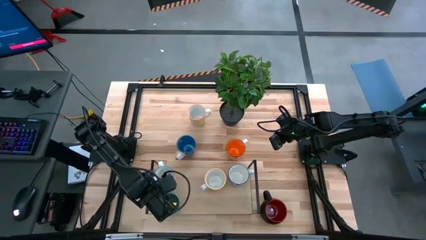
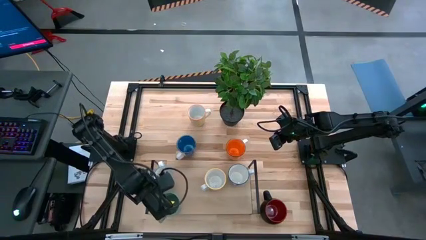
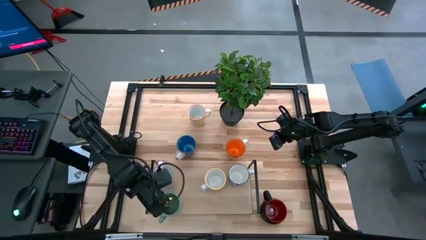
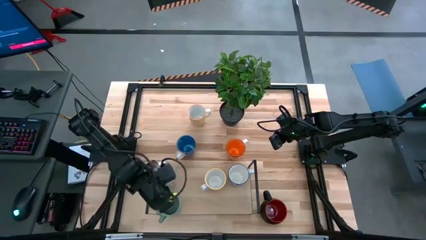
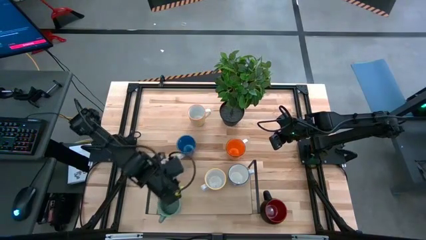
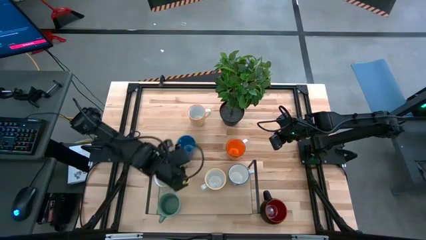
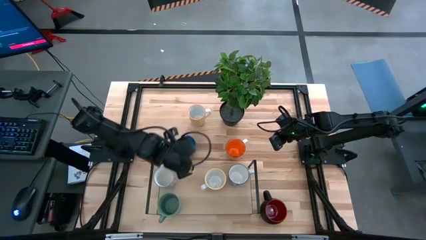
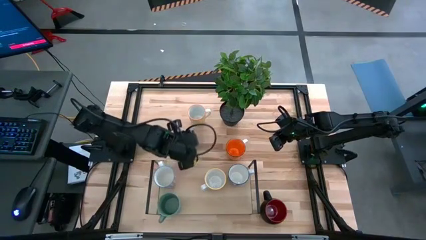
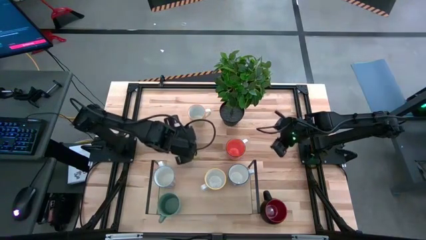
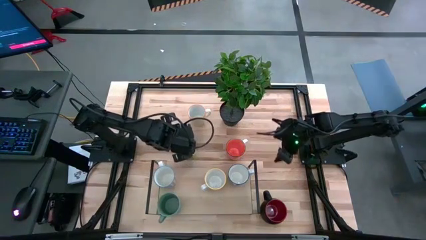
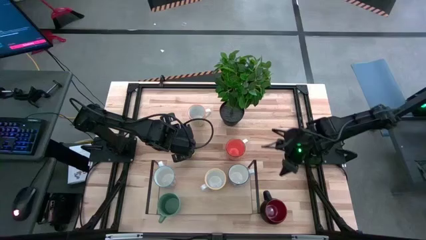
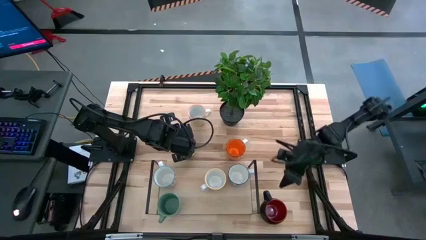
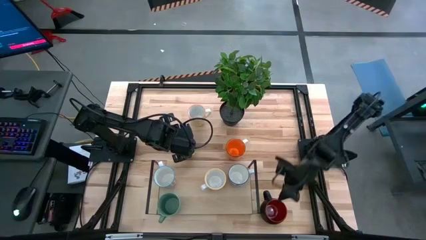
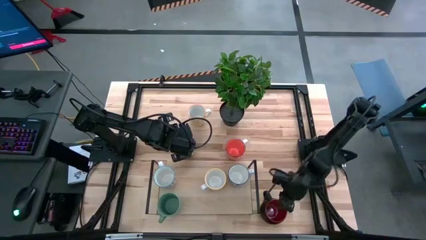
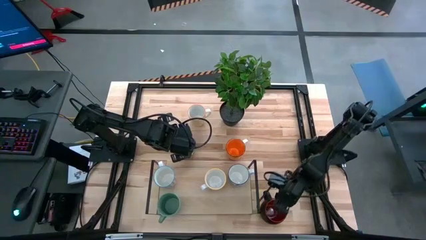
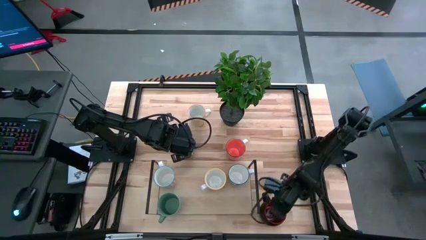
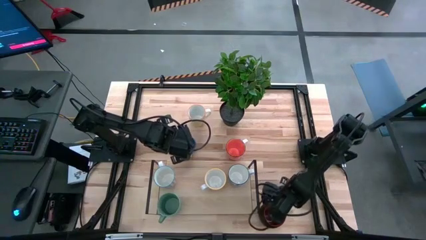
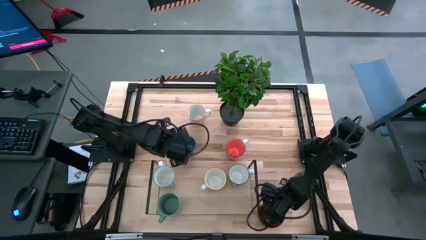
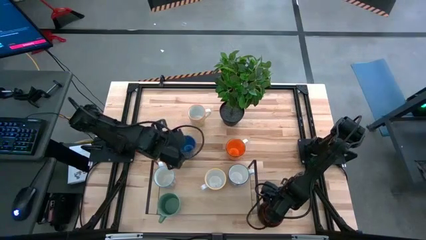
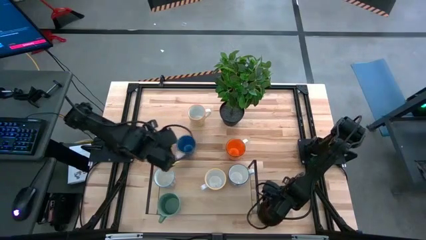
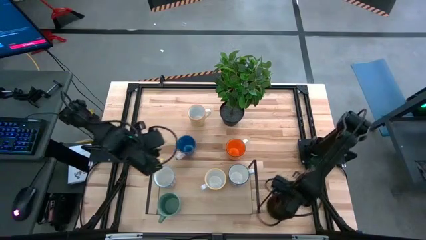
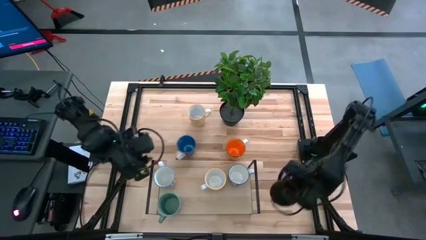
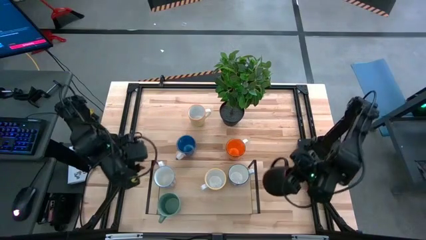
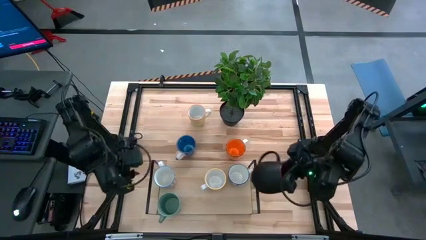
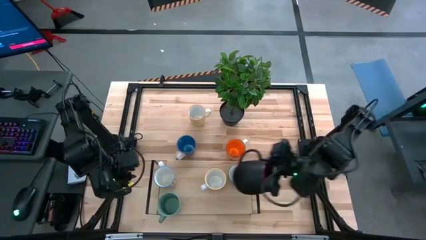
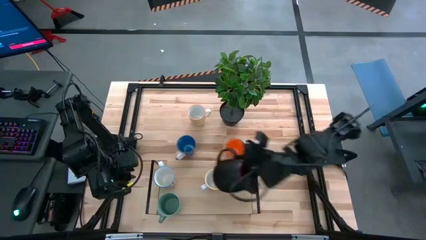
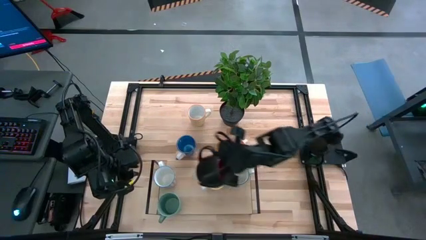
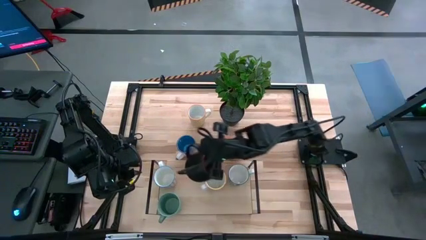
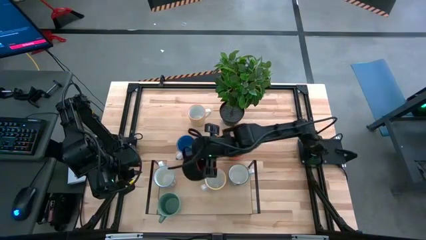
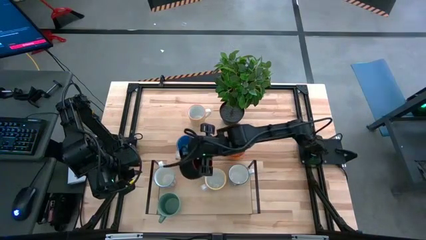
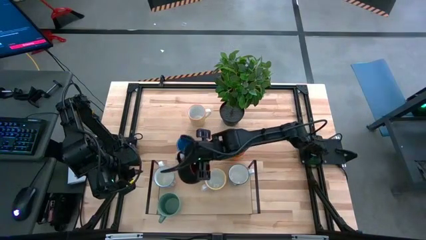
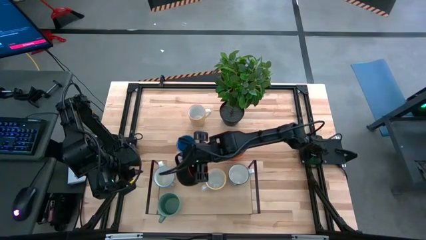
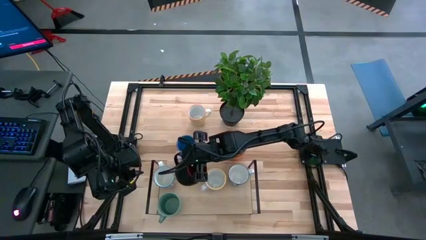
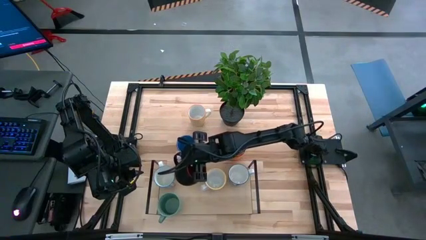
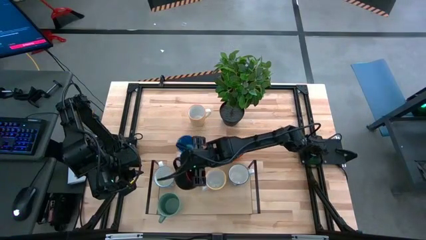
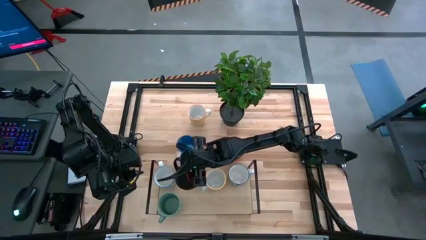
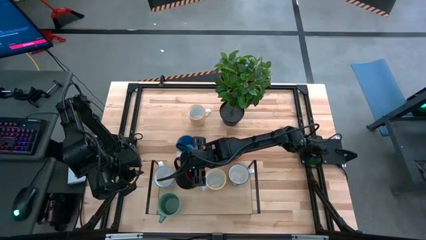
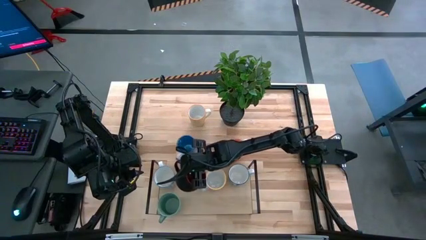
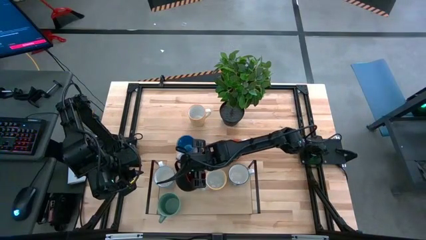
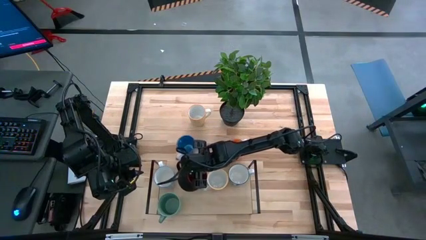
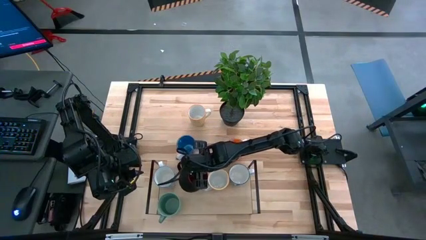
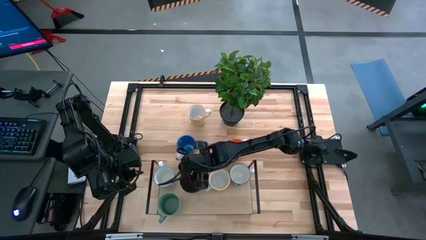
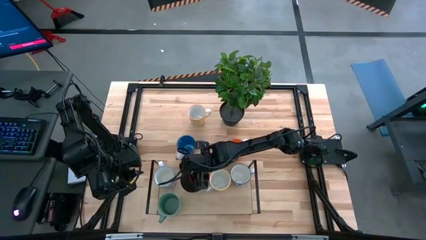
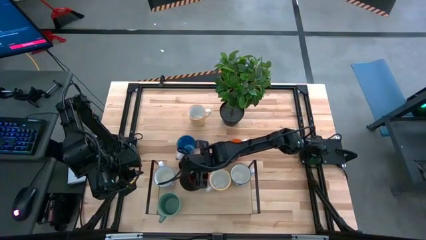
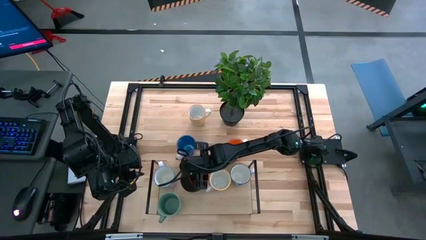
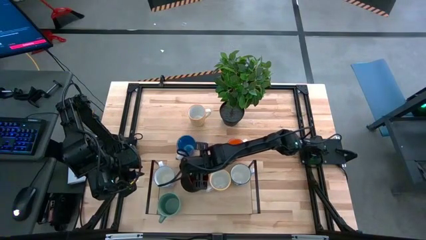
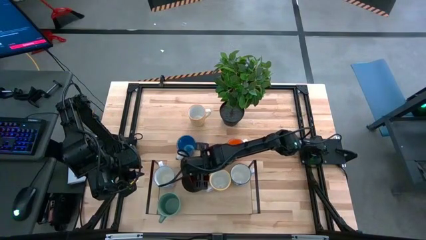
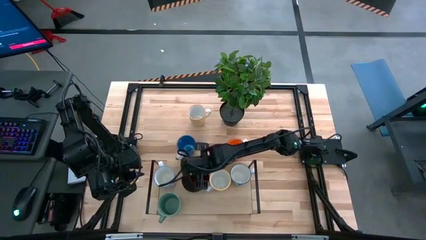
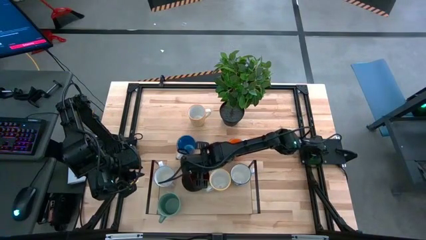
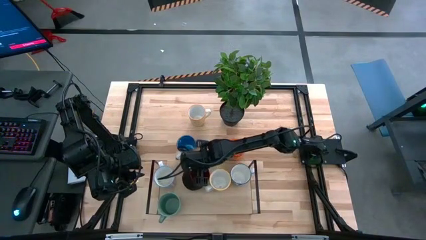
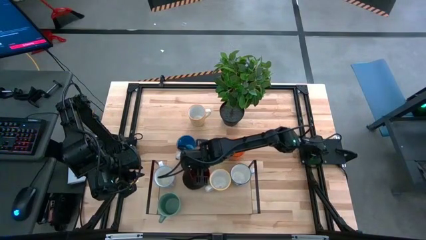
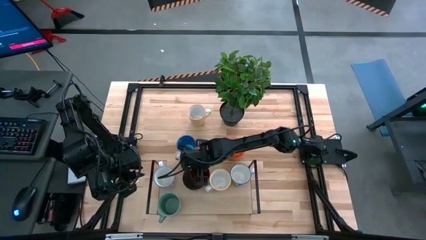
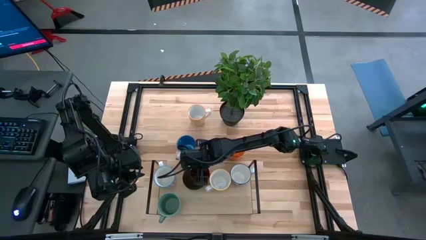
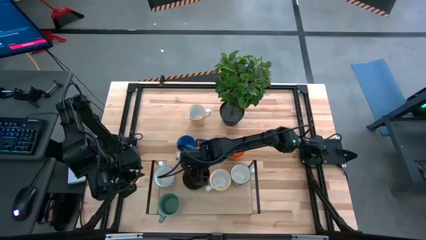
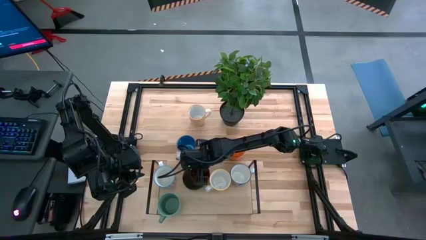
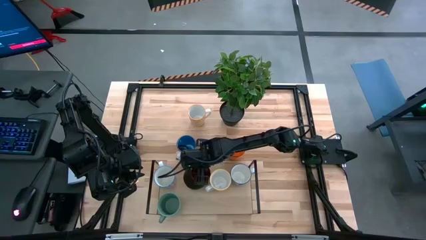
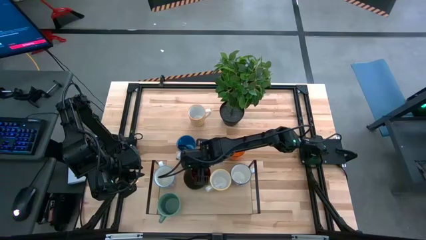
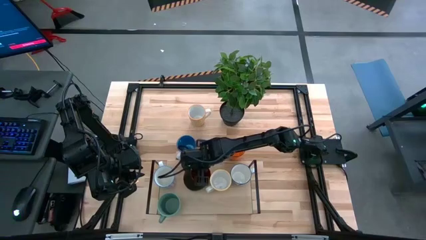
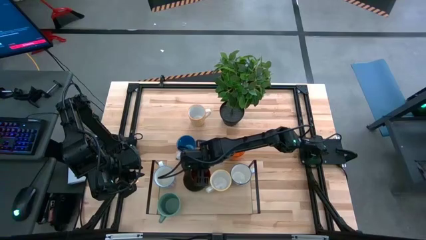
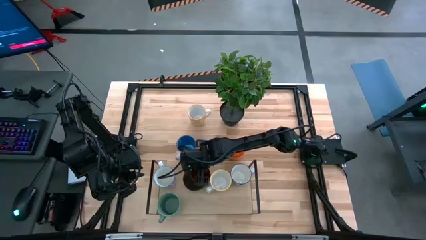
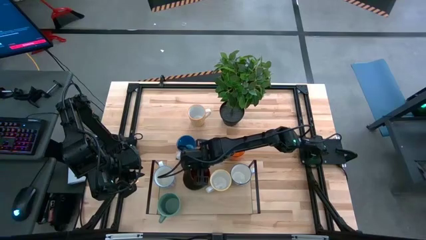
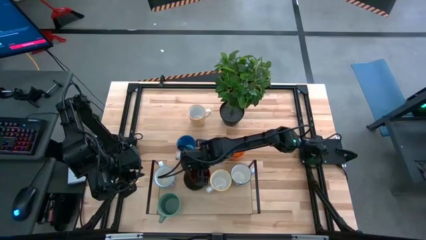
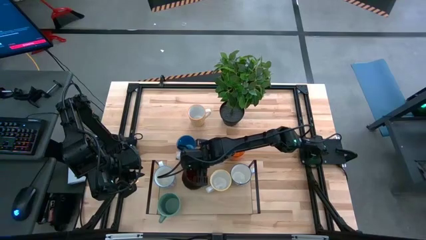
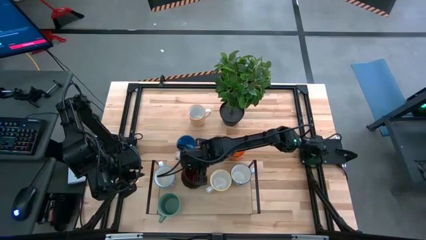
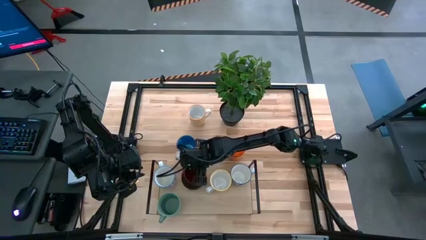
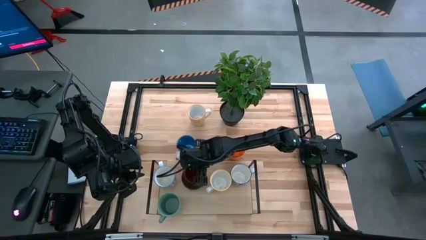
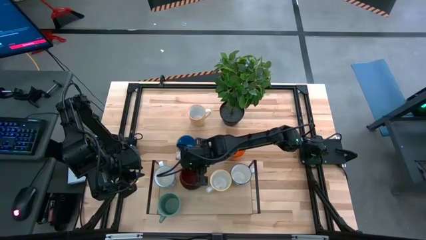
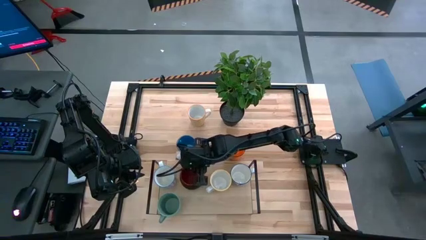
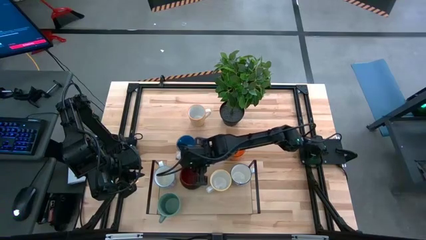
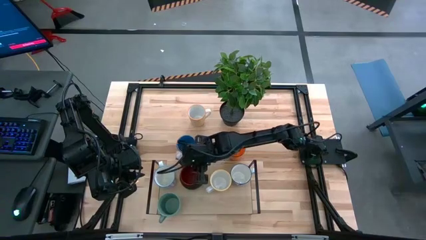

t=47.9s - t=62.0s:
Task: Place coffee mugs
Put the black mug on the shelf

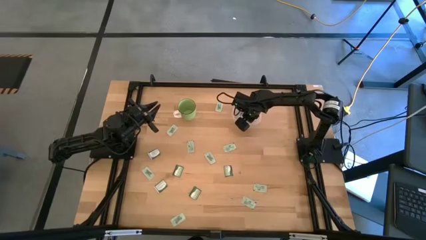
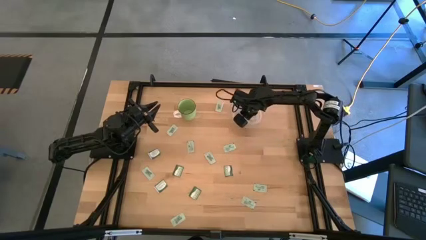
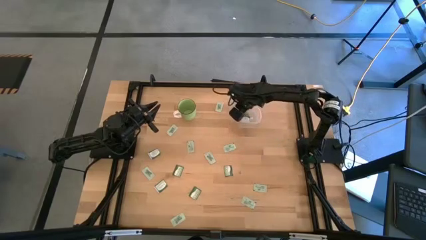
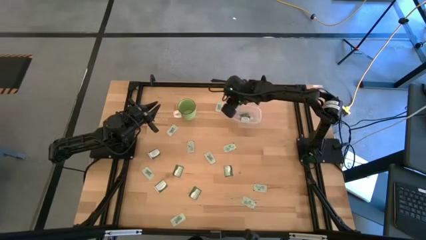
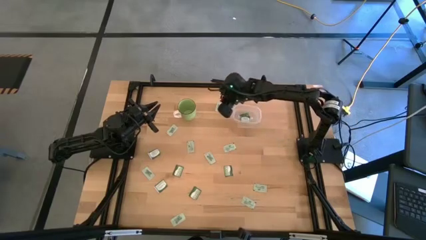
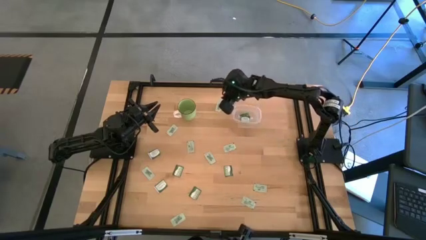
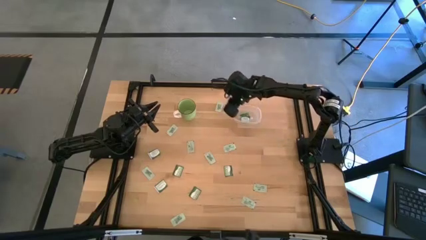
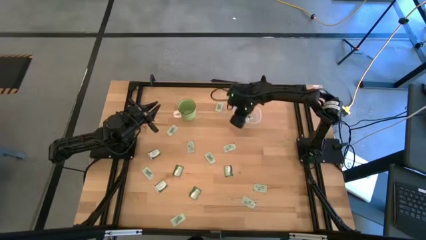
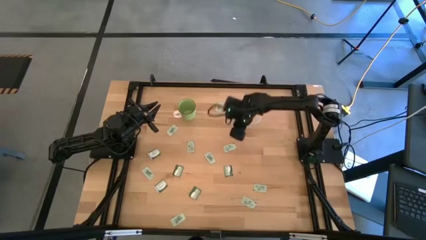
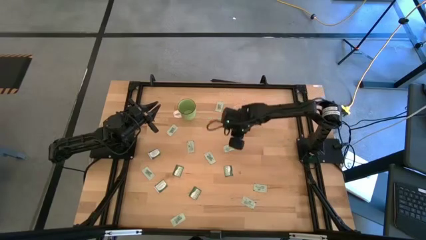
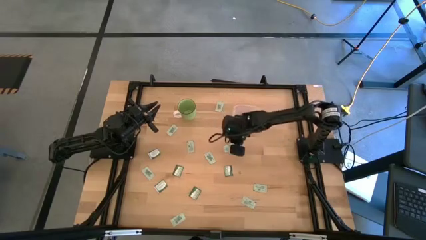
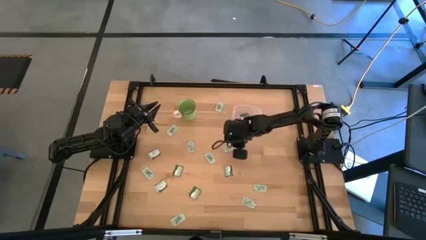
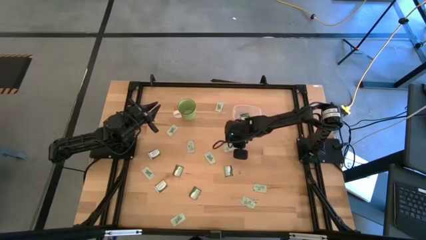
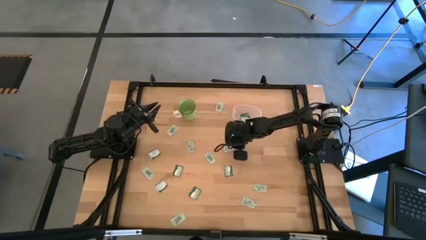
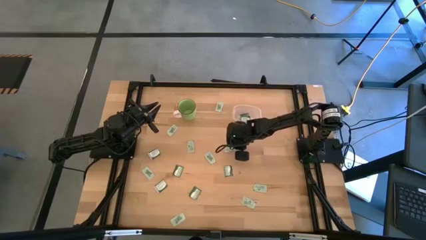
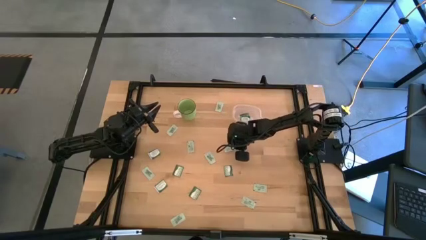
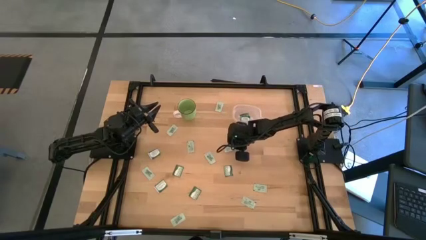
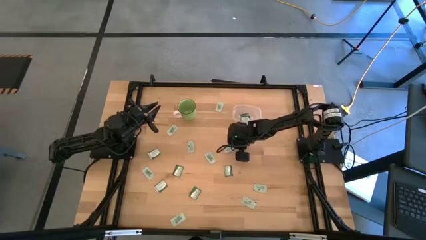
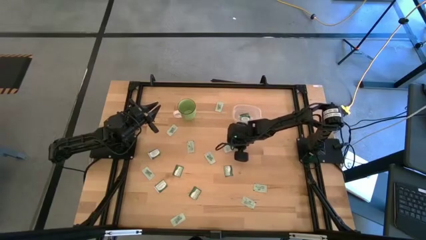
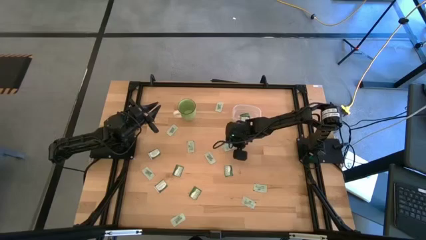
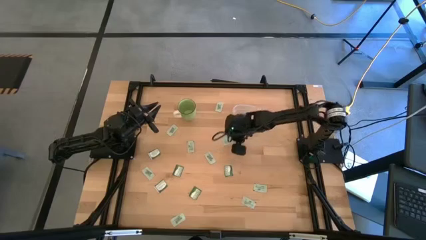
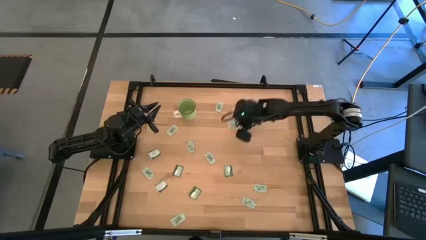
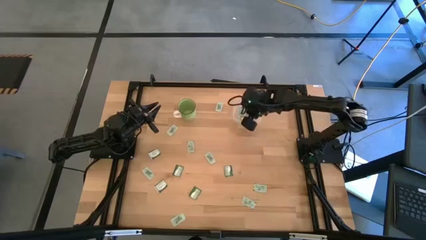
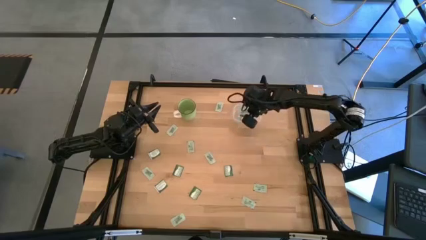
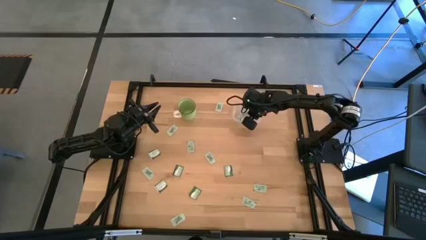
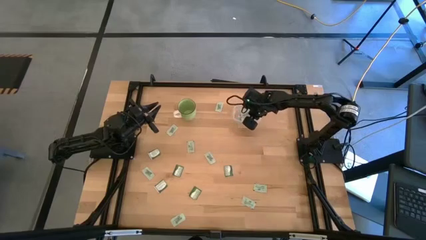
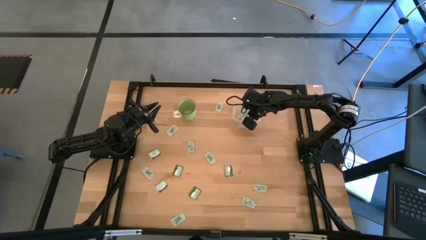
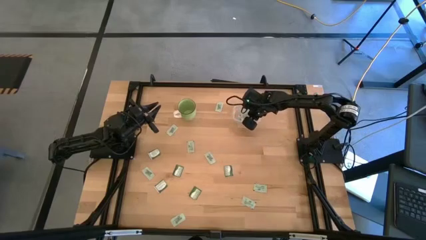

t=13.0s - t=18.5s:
Task: Pick and place items into bin
Put the white stevia packet into the transparent bin
